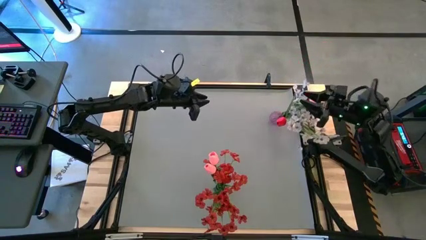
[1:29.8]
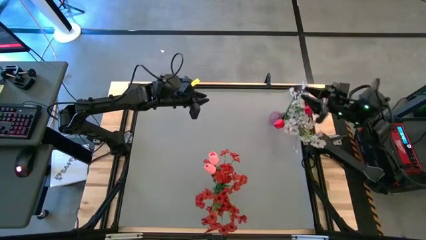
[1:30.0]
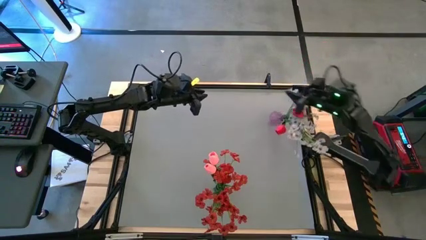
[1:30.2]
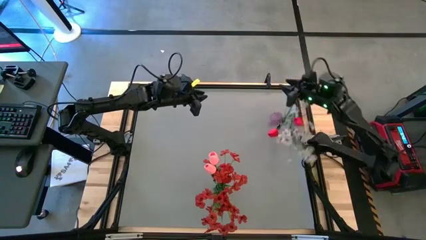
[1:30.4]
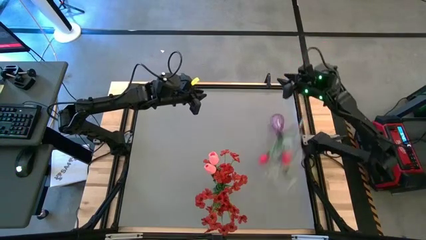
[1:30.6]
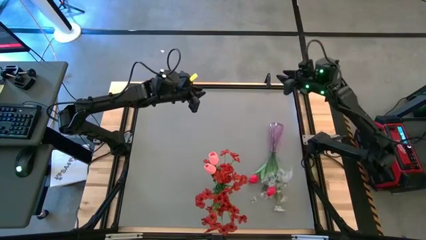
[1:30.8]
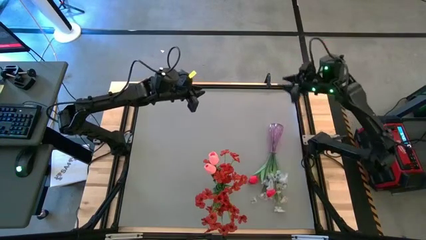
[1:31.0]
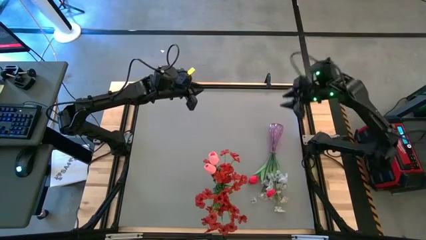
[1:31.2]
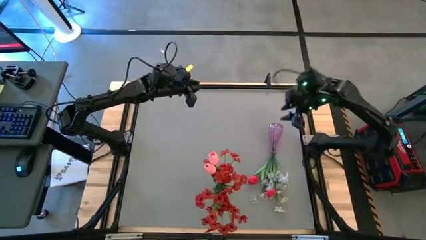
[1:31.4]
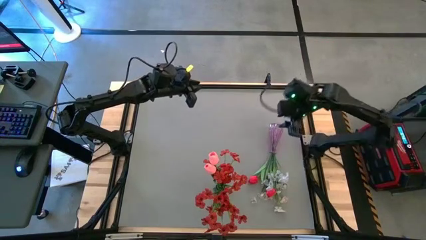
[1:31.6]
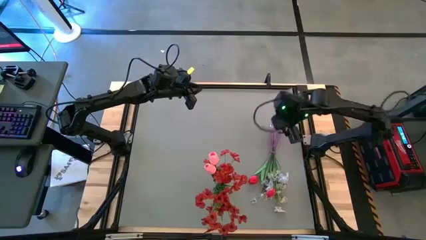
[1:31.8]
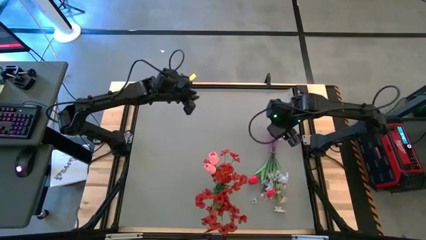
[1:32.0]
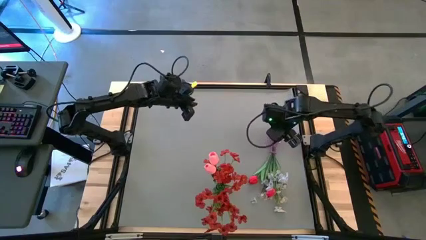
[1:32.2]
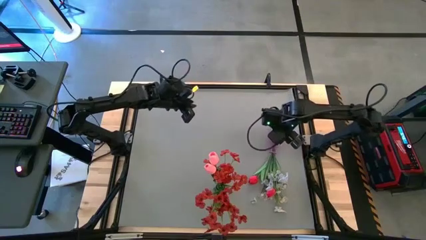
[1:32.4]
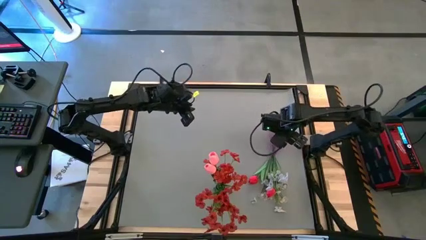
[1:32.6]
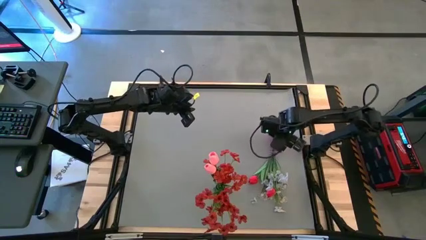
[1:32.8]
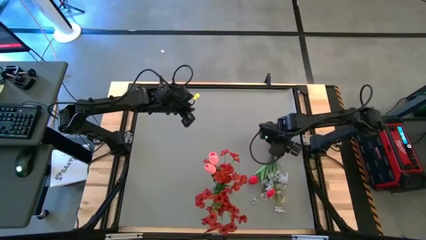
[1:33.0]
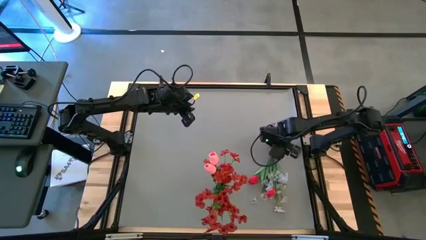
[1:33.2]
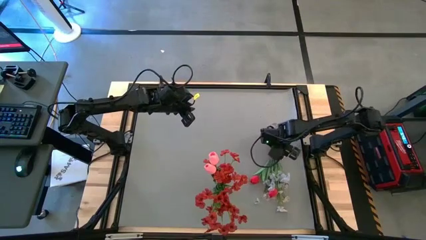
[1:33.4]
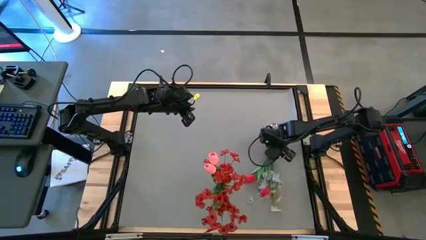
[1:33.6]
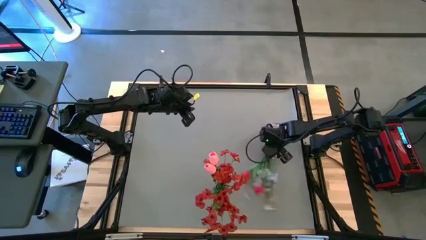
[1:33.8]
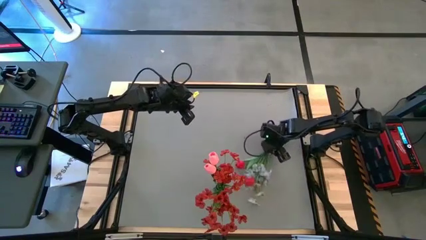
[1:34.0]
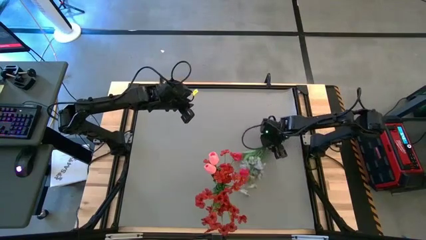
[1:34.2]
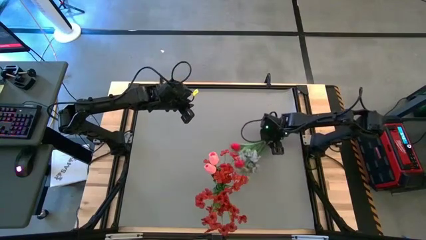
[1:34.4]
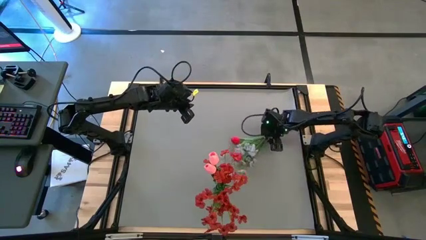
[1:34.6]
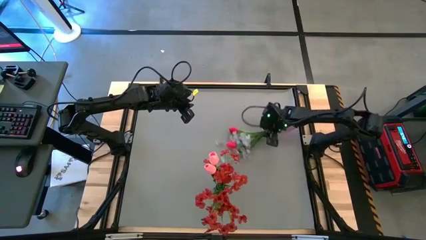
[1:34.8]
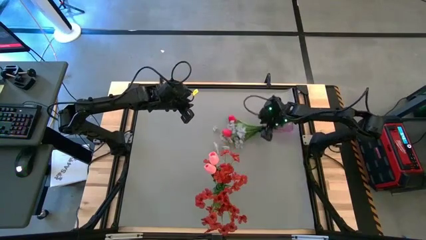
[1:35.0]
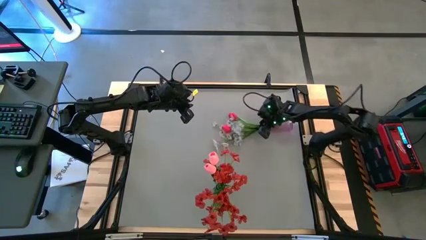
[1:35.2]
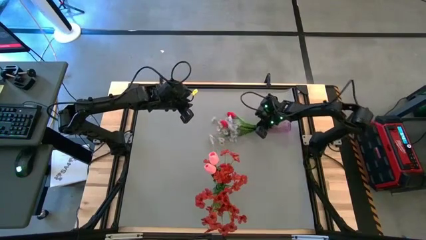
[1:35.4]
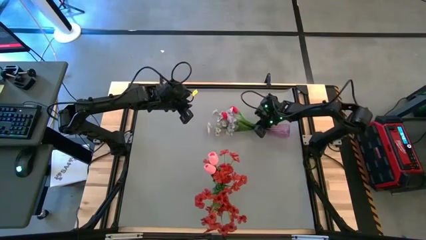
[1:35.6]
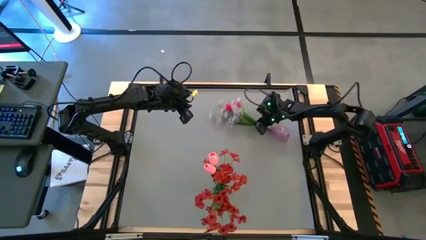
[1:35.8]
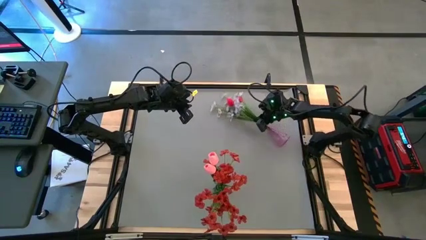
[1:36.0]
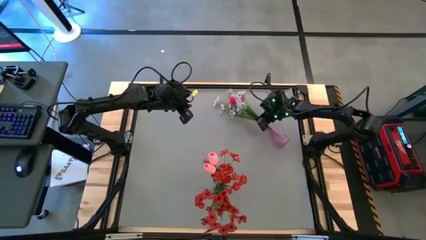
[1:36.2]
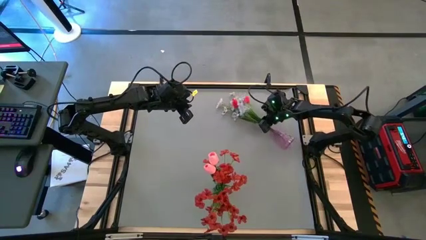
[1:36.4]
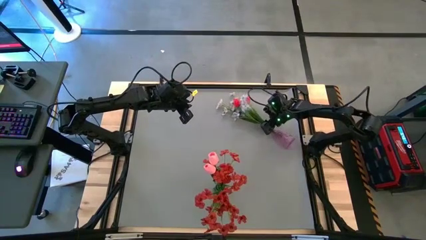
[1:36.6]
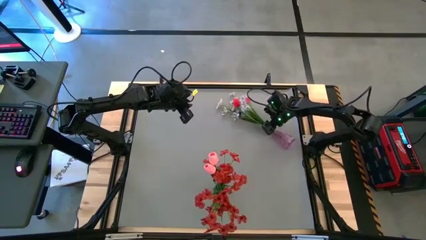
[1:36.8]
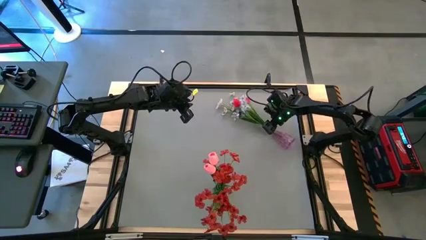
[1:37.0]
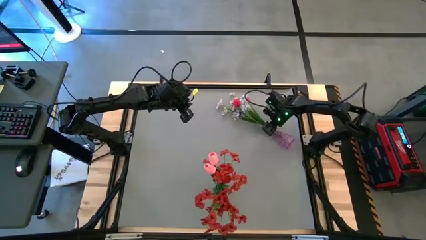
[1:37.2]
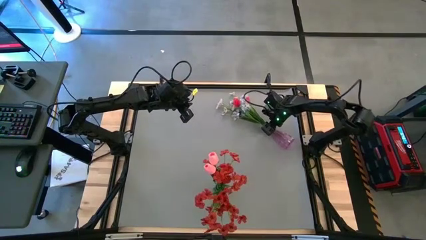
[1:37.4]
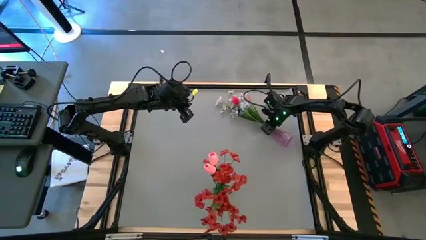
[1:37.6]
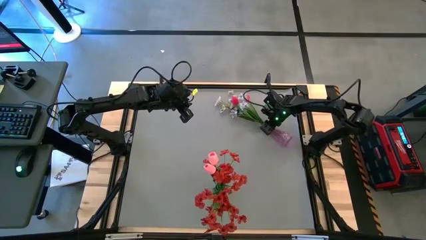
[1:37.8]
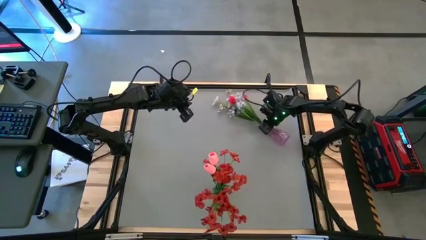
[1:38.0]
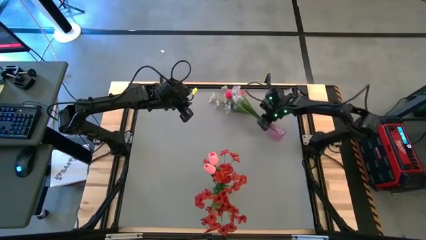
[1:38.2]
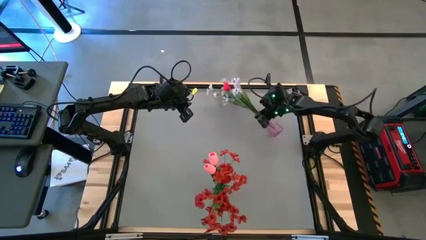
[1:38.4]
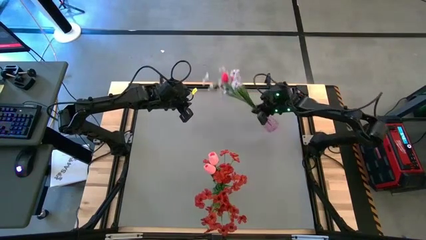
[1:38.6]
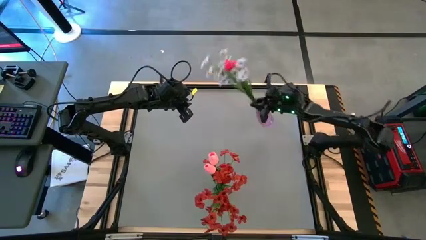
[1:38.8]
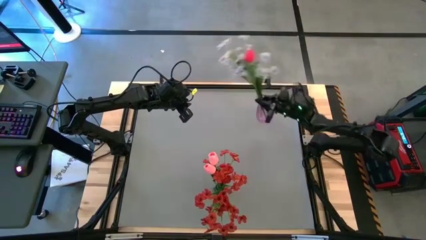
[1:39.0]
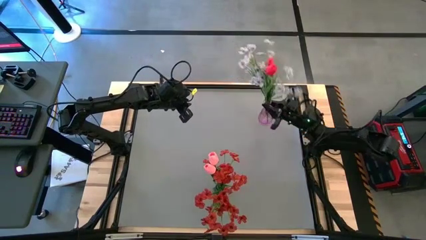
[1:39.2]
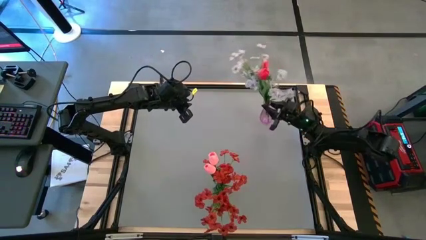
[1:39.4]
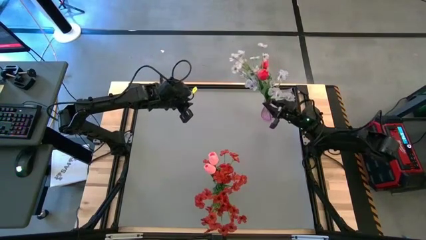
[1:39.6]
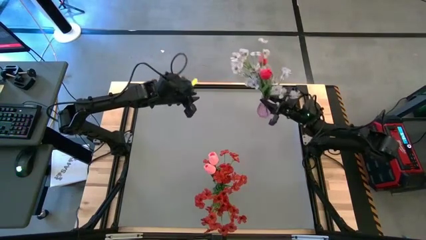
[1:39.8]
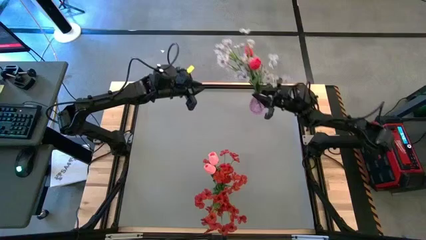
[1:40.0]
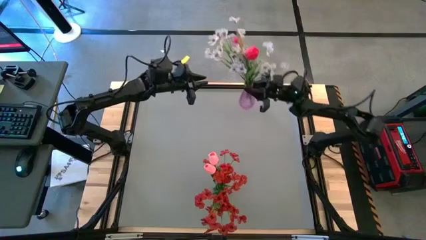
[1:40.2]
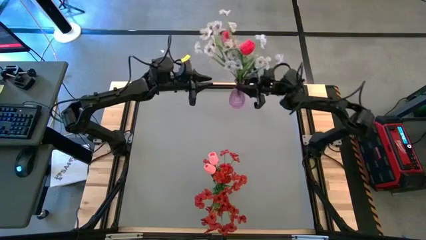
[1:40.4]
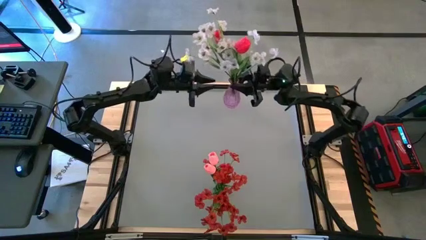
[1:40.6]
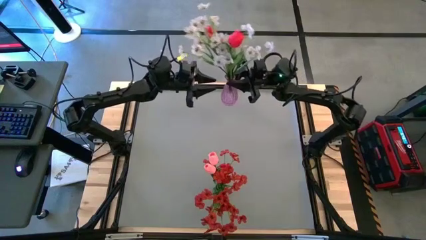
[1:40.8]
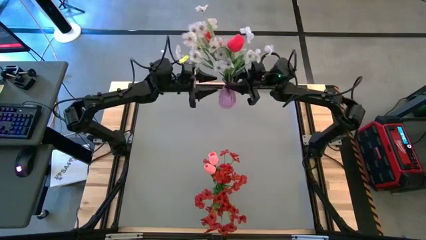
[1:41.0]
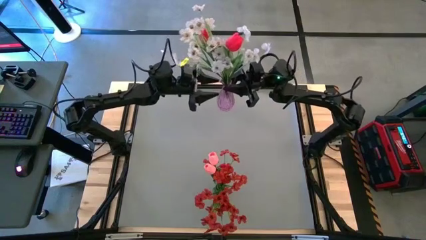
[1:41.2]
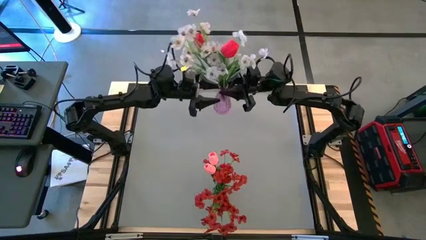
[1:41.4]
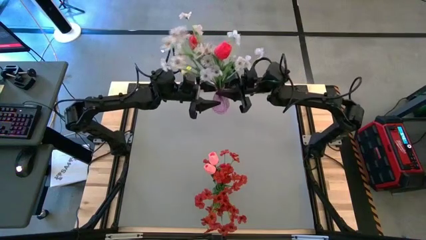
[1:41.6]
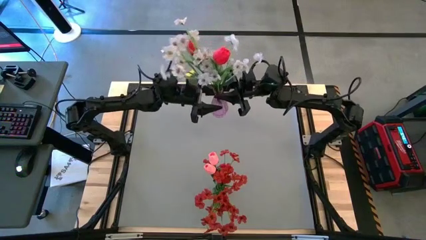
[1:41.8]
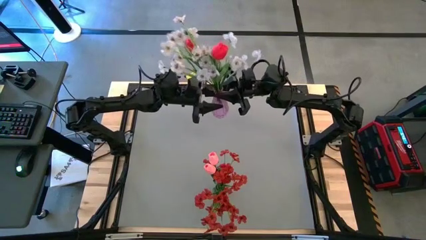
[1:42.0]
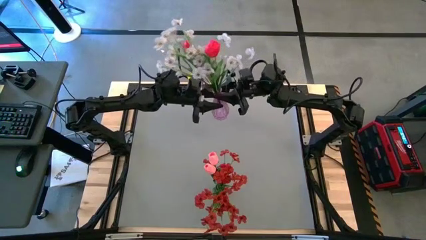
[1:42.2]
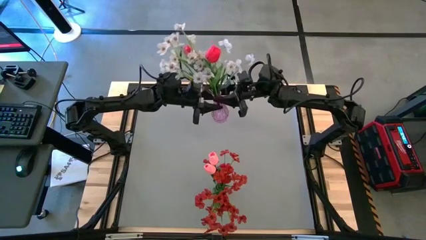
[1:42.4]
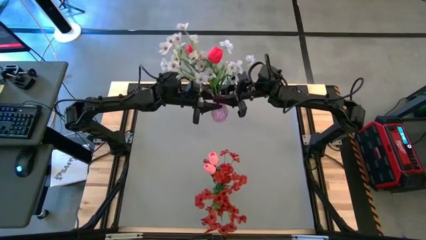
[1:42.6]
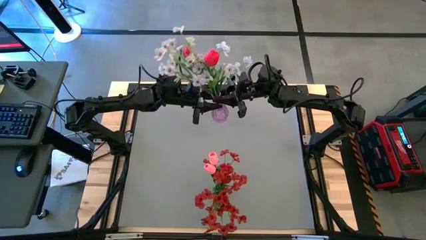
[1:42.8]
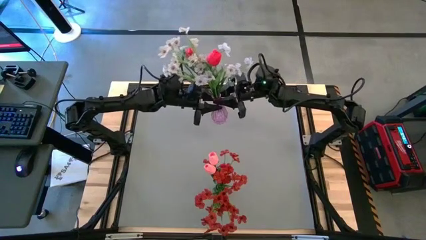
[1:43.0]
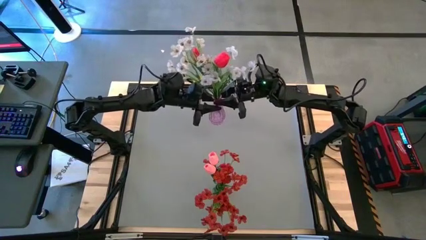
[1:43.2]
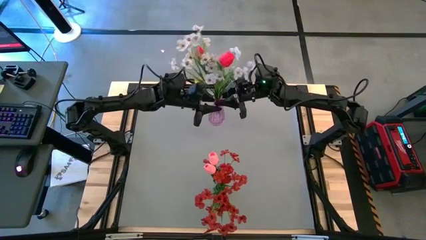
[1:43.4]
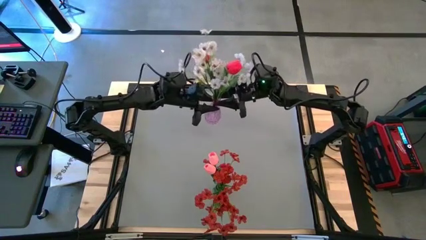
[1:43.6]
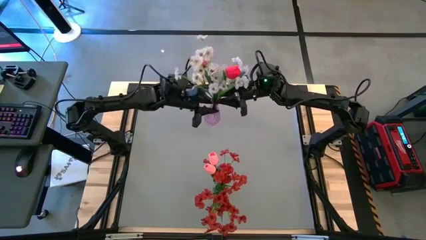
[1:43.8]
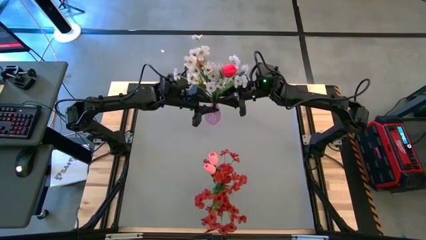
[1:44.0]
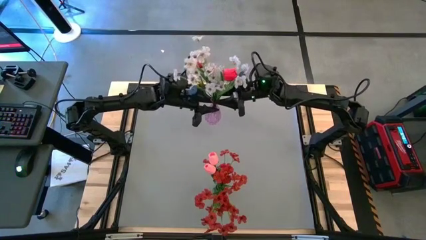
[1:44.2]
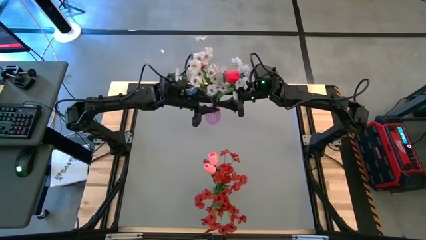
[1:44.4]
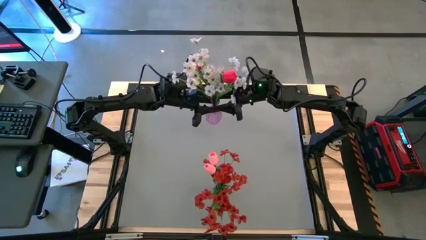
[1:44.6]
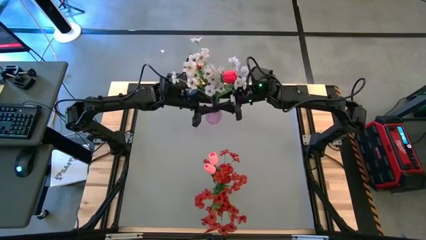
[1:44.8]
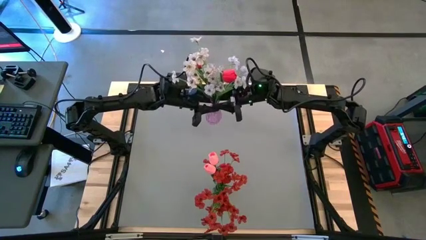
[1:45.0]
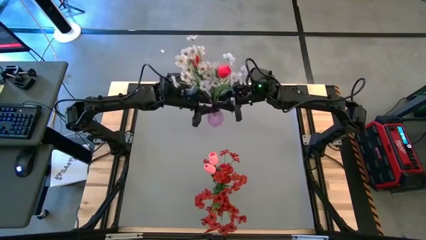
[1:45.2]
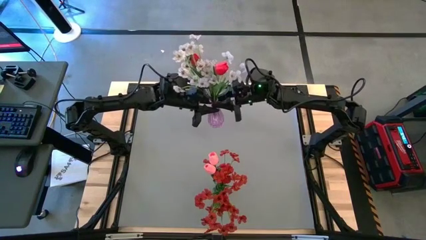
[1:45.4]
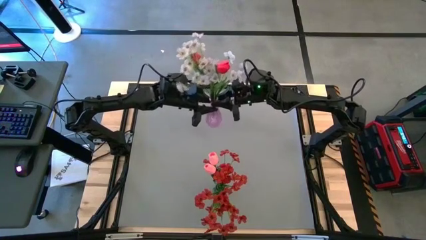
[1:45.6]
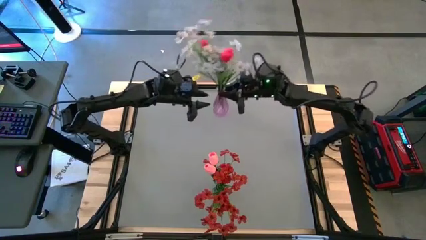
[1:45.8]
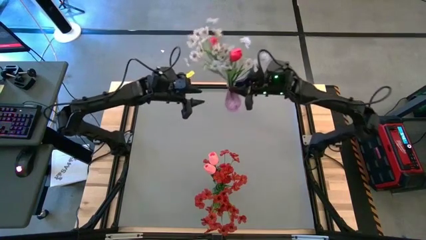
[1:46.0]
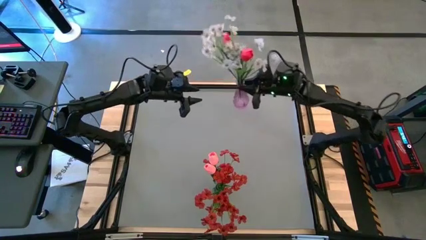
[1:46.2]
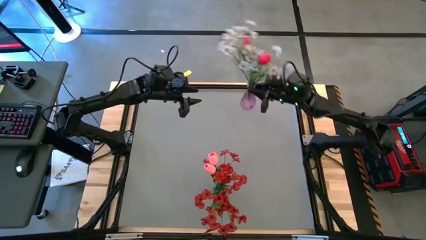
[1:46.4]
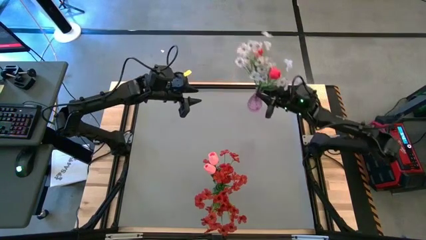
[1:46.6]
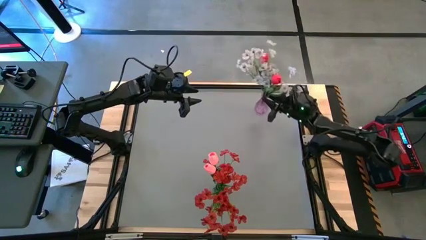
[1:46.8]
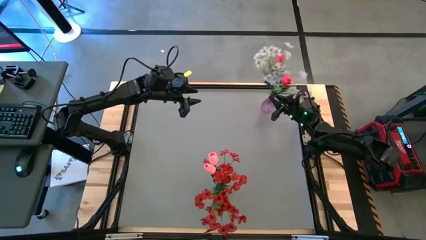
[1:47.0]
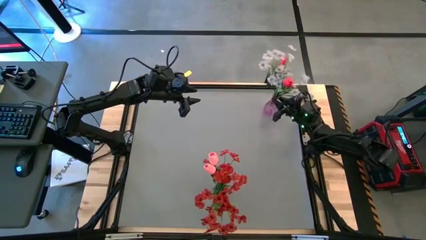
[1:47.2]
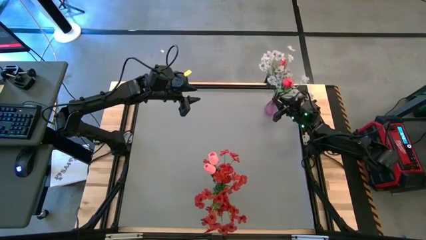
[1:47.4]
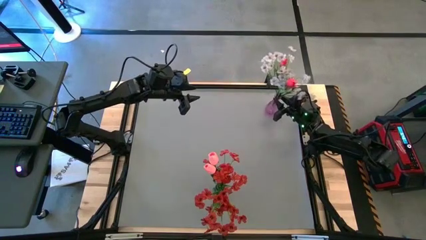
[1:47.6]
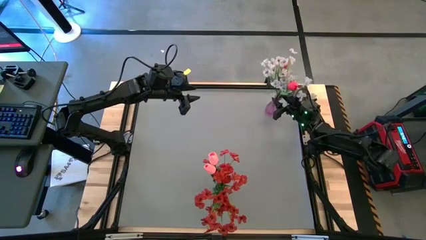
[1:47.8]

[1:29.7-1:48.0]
Task: Sort flowers into vase by color
Adjust the purple vase
